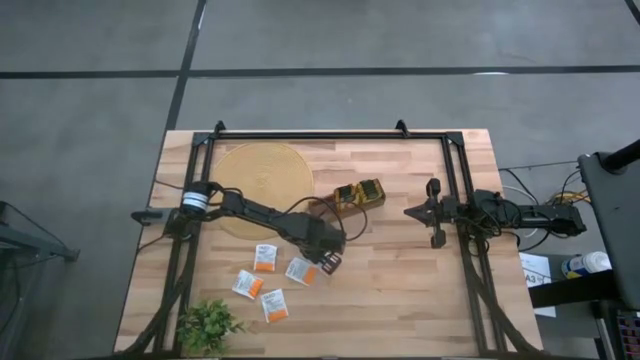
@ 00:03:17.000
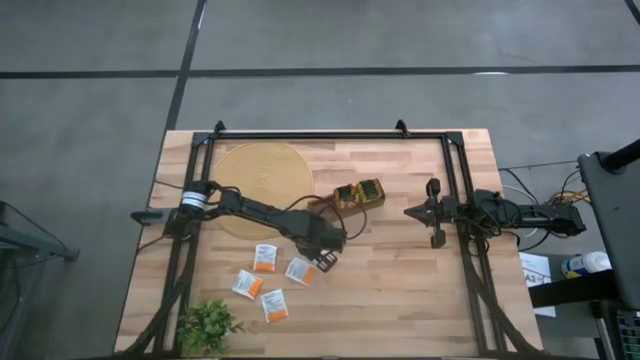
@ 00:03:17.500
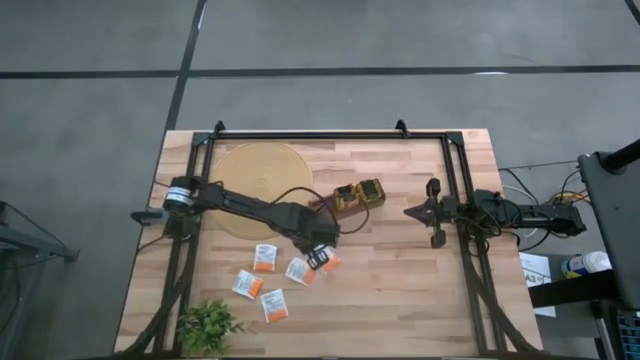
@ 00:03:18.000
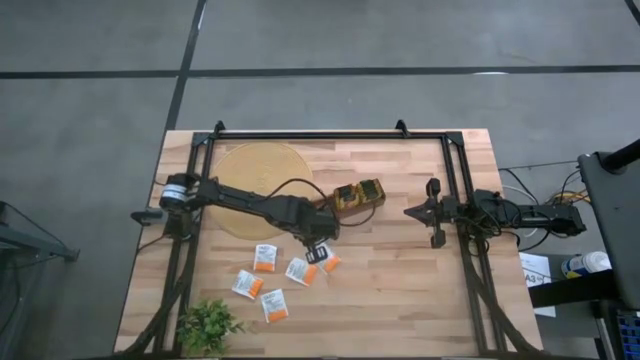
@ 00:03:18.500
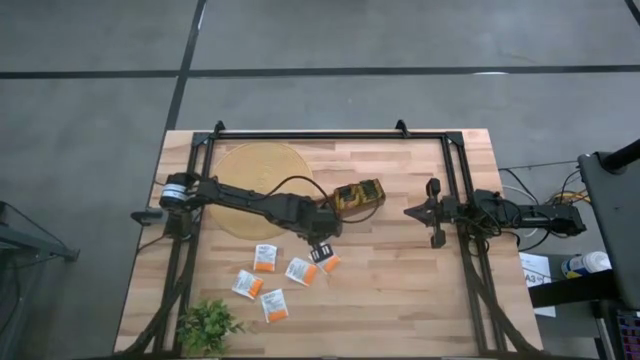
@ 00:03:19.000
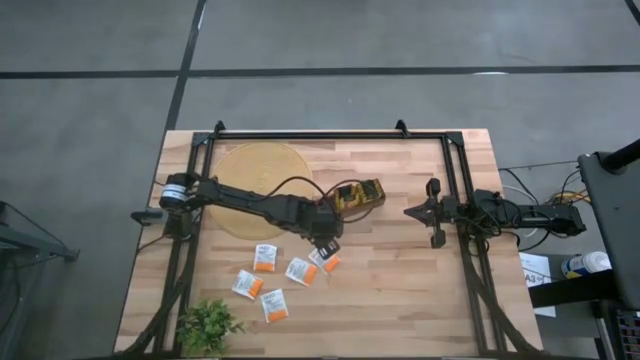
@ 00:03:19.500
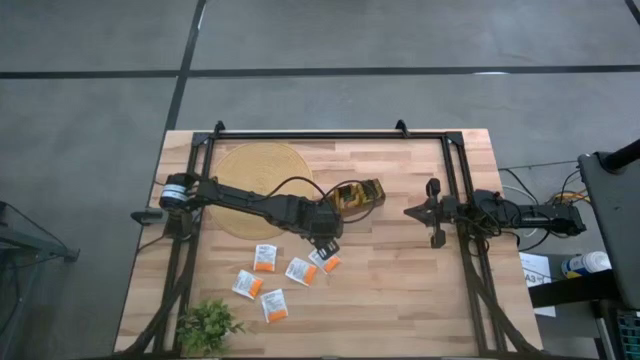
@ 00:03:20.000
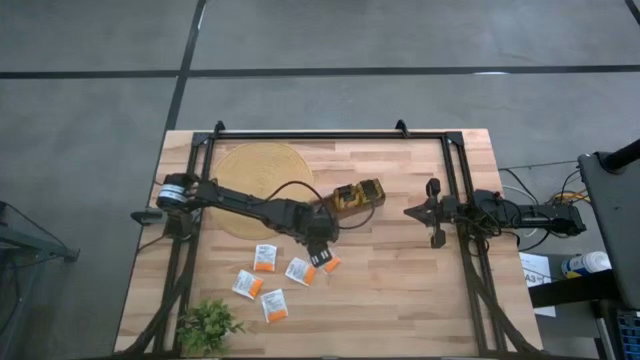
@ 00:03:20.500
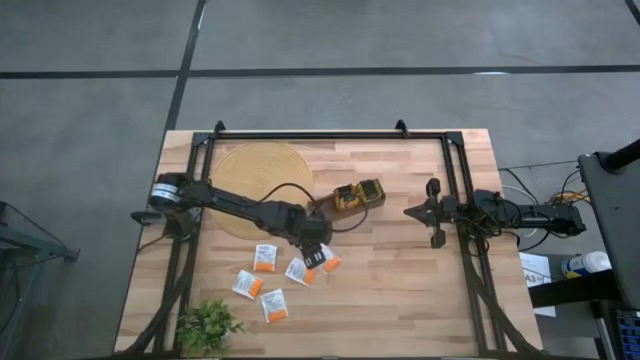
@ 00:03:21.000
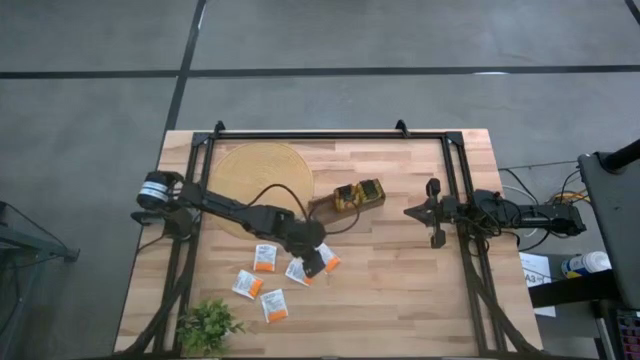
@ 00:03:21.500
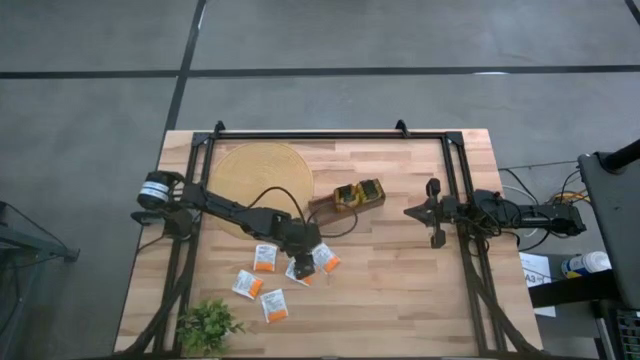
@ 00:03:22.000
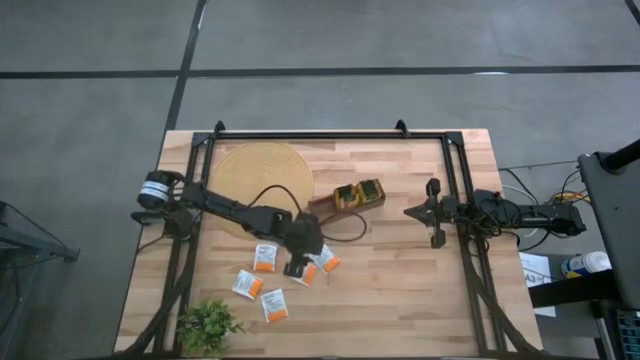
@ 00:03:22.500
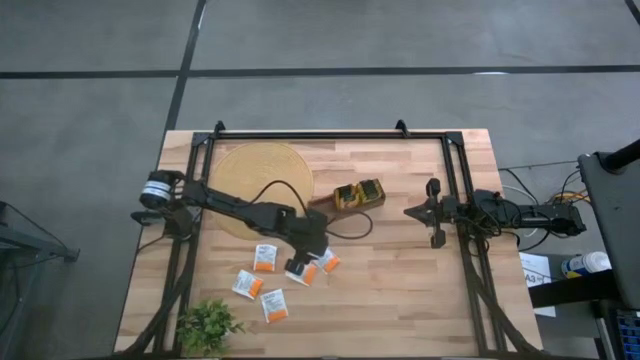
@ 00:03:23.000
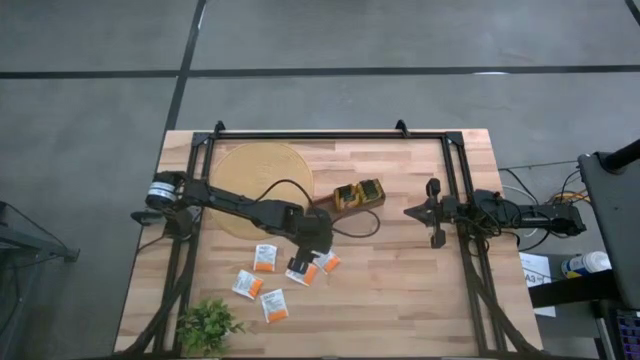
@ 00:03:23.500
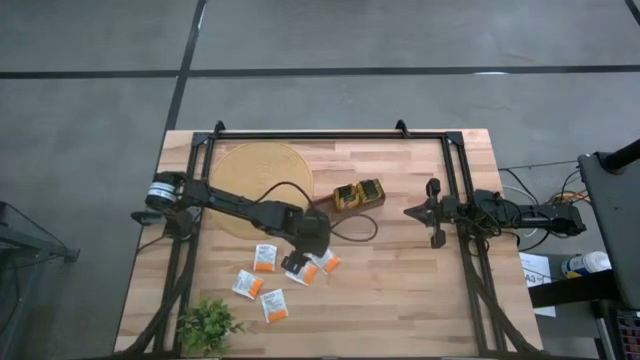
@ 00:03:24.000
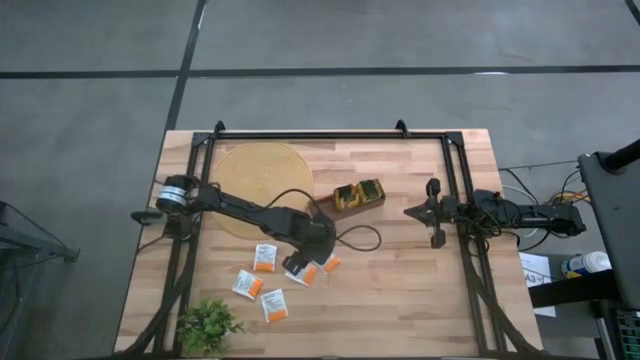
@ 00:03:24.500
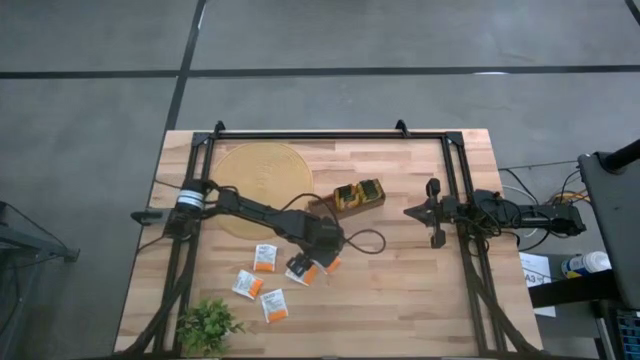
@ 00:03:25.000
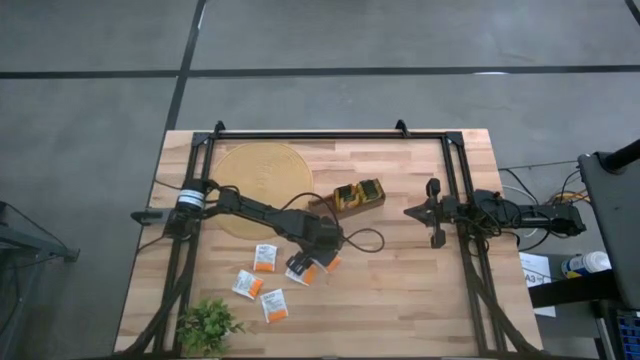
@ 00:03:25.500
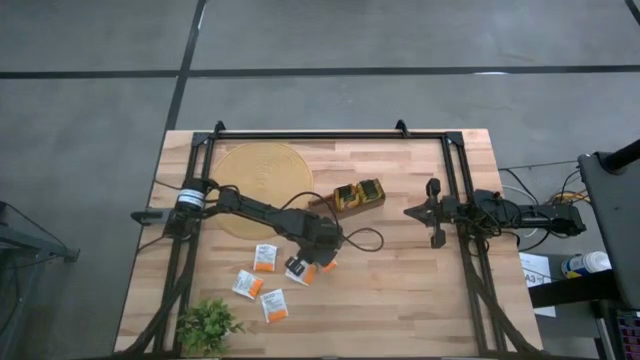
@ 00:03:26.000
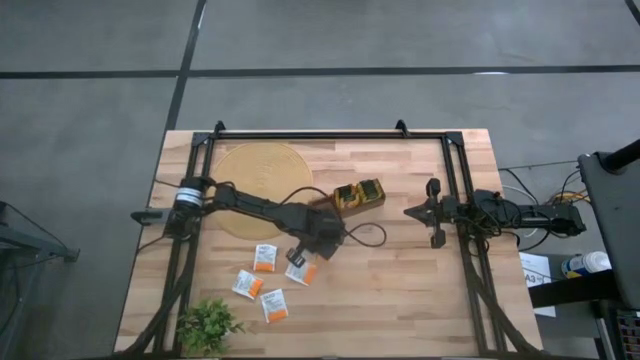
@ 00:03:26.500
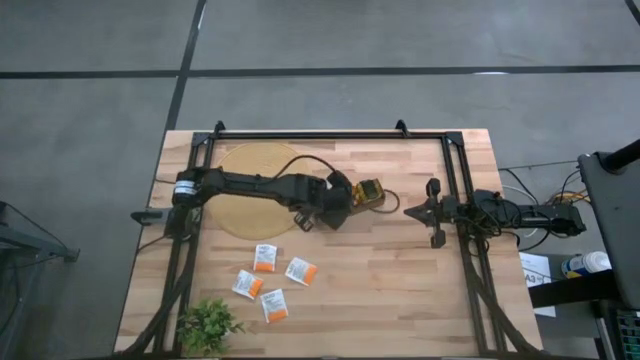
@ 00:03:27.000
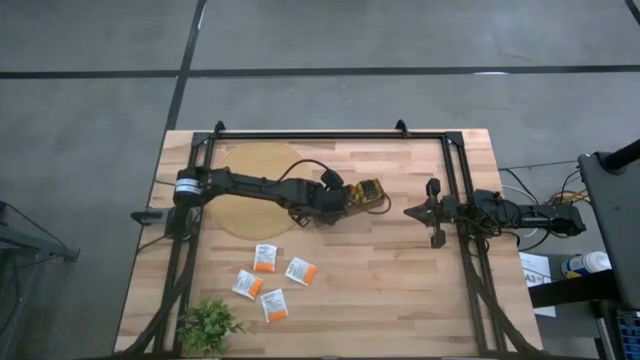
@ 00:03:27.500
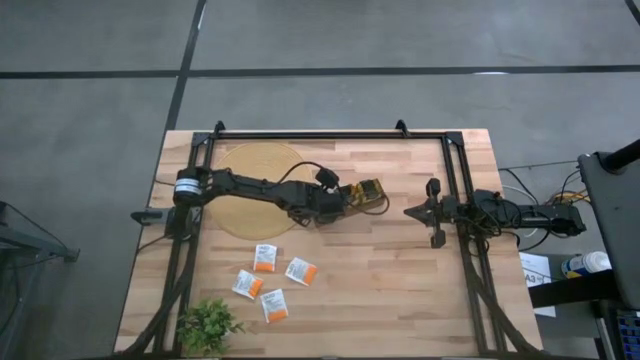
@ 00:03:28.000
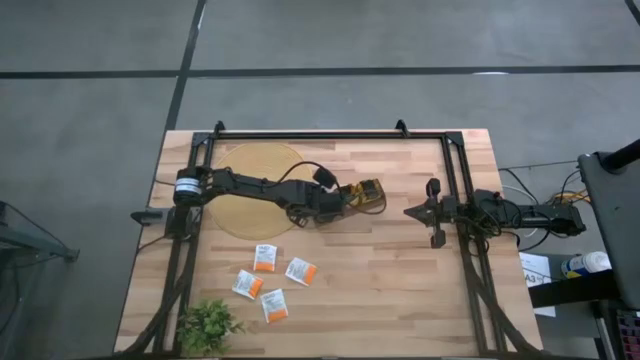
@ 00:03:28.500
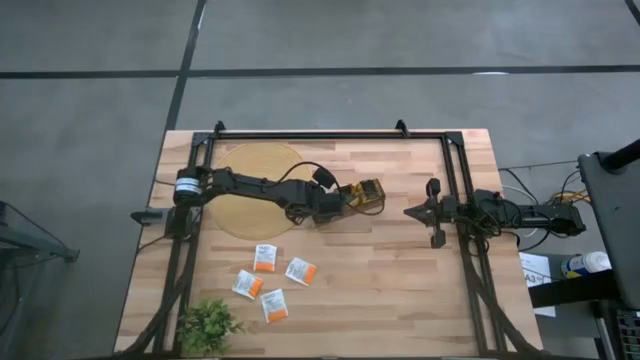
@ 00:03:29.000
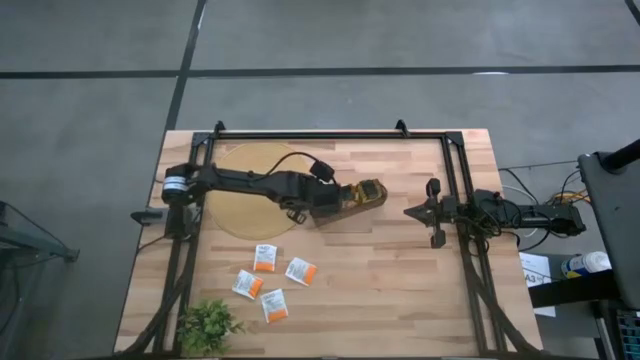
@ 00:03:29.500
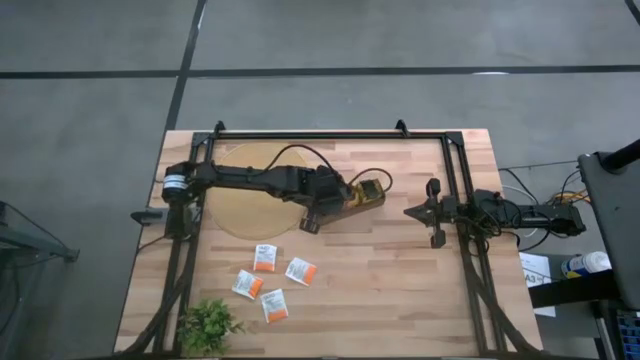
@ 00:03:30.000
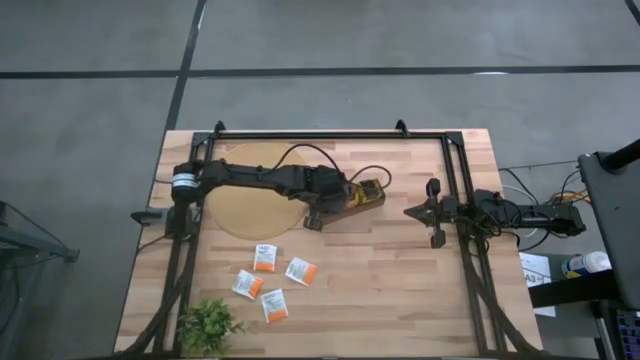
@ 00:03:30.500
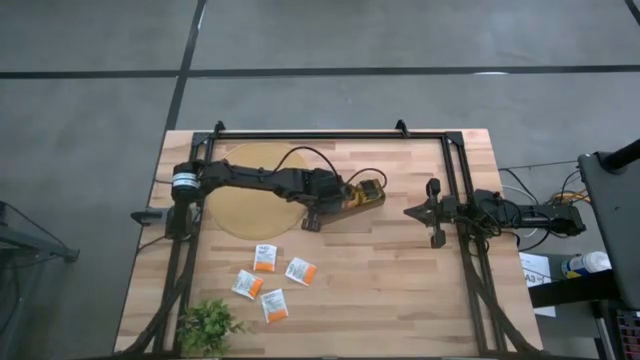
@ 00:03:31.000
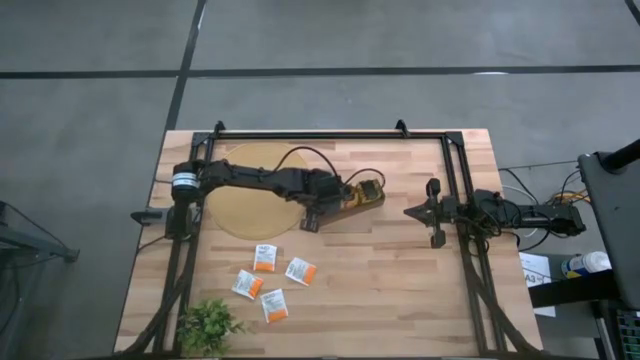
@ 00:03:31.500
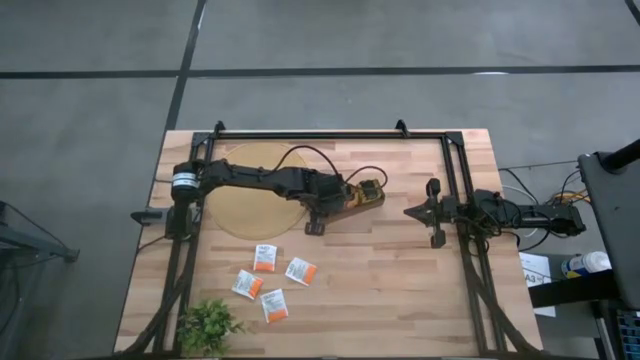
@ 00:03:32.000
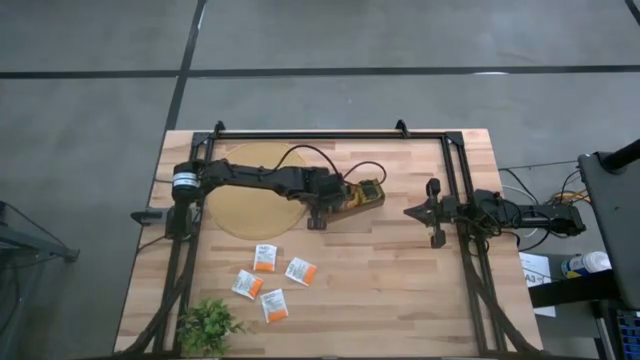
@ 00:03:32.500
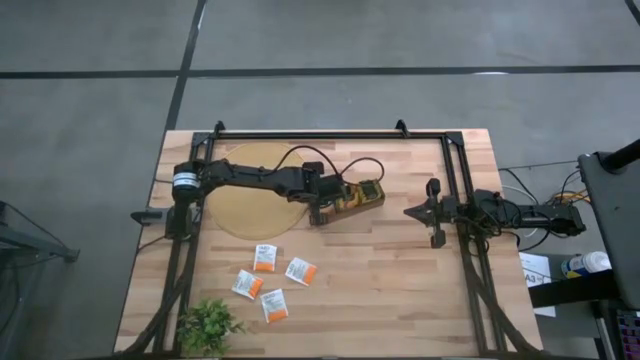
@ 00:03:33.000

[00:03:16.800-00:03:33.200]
Task: Pick & Place Tea
Put the white tea bag into the left section of the wooden organizer
